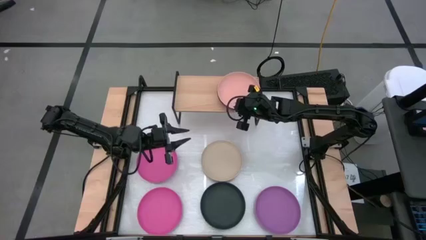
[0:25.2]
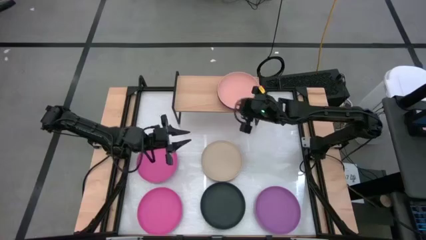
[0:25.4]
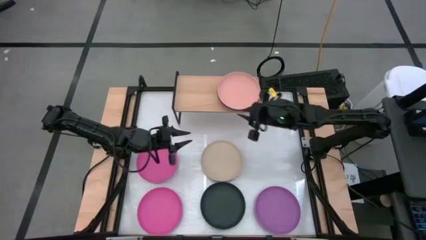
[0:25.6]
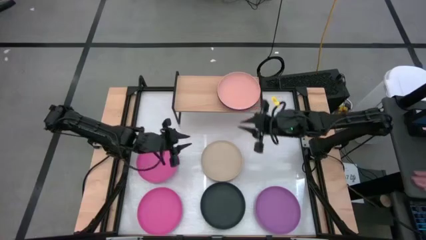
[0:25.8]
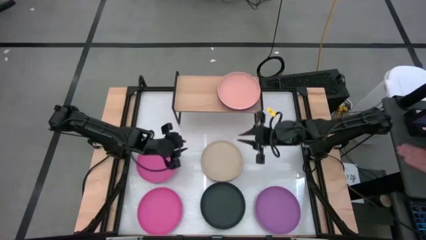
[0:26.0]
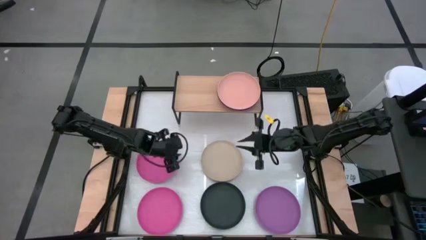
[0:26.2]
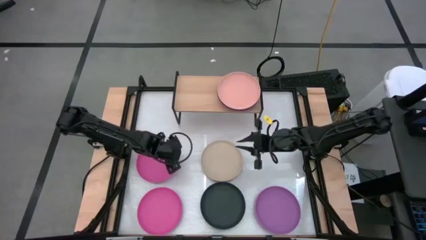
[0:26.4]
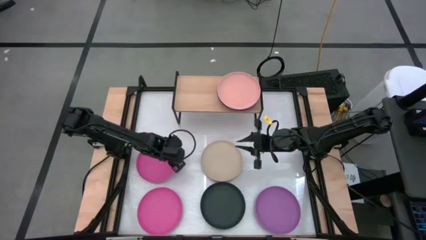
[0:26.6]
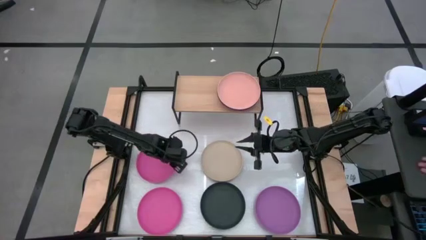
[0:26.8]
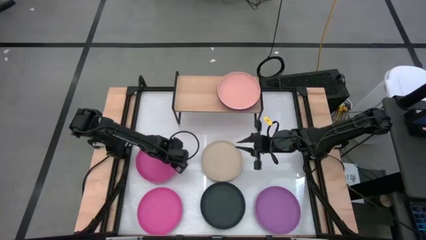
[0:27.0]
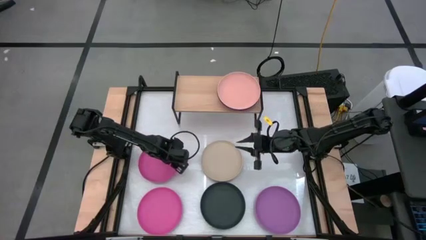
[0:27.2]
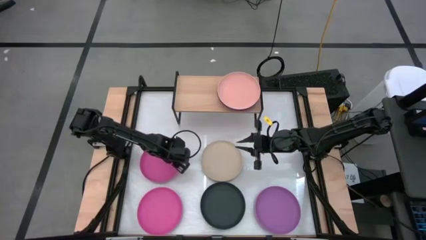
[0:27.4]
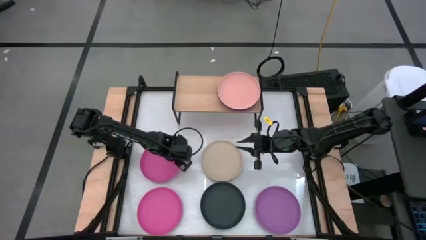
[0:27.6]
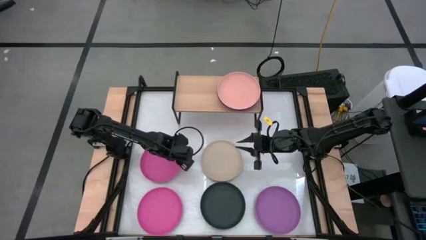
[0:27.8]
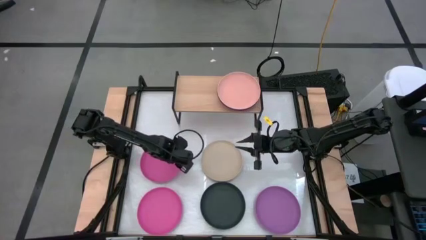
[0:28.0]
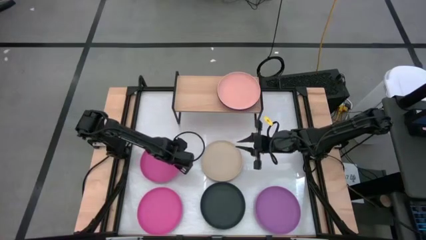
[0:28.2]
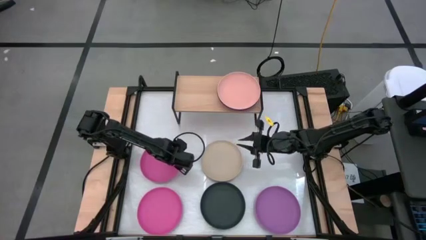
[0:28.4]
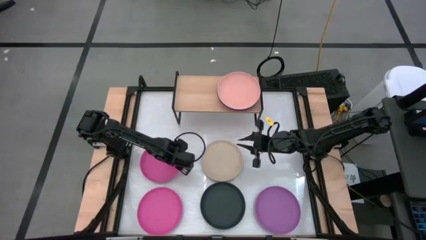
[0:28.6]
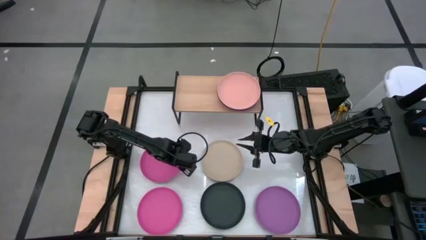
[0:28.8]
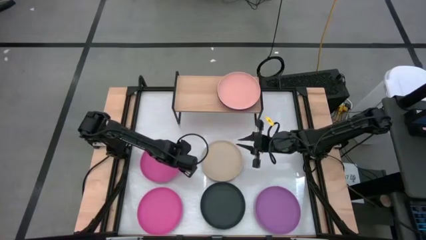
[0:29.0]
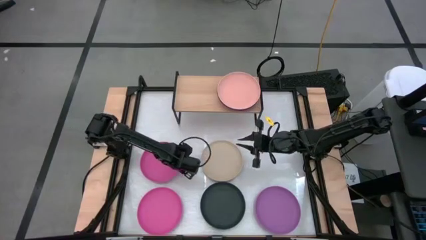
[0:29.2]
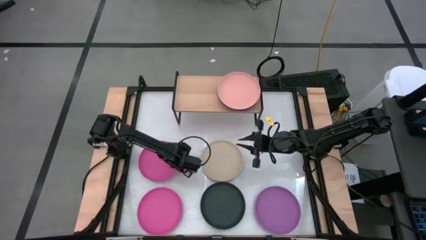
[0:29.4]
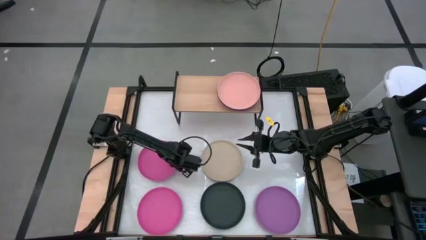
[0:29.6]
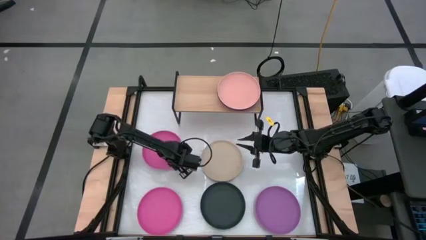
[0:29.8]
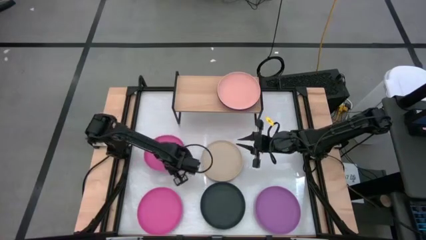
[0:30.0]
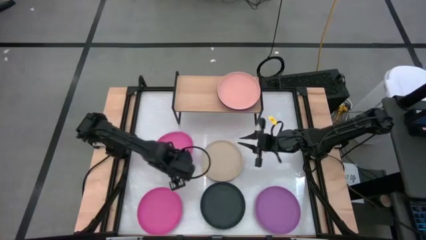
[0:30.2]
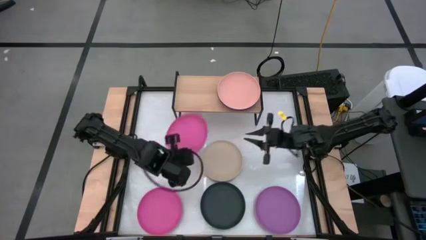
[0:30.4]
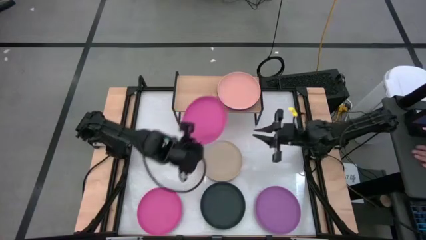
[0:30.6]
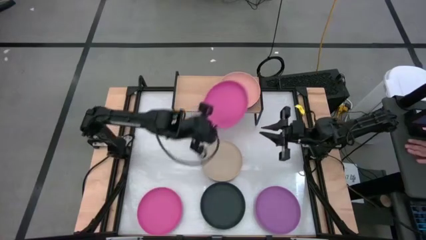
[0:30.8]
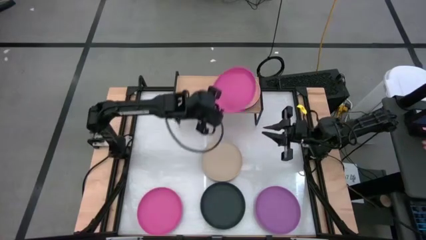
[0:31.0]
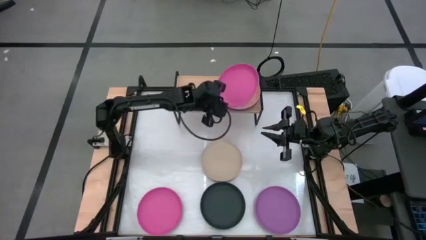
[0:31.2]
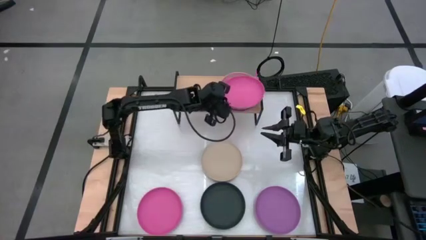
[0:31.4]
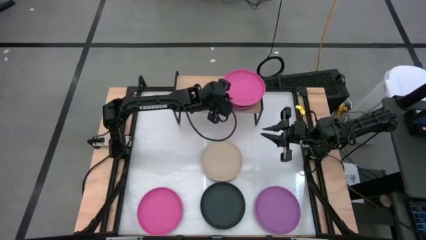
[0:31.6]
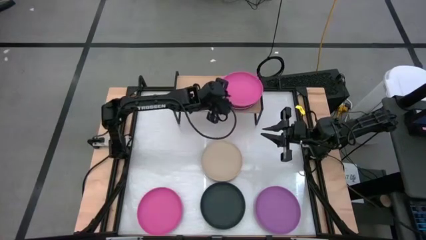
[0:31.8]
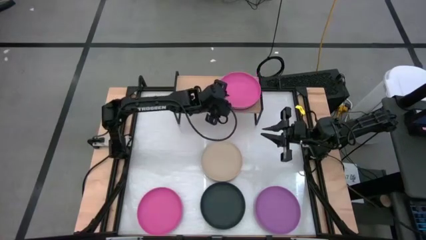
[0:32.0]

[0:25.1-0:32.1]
Task: Place and stack plates onto a shelf
Stack the top pink plate on top of the light pink plate on the shelf

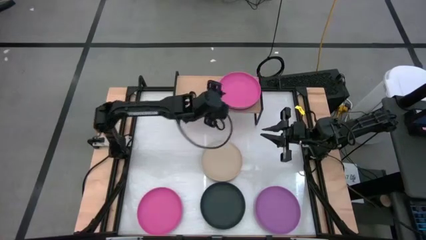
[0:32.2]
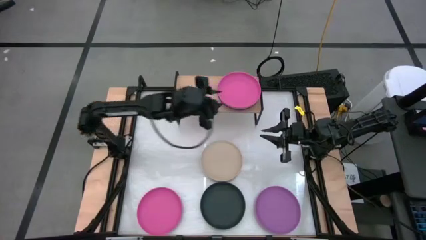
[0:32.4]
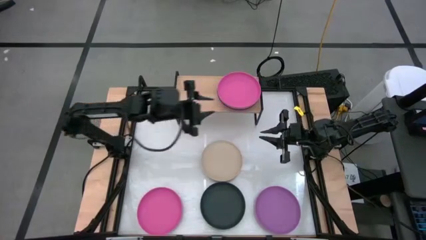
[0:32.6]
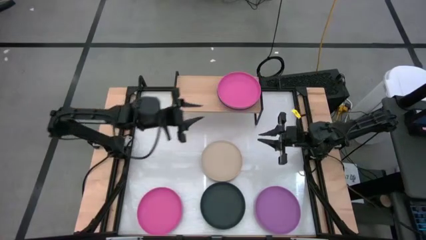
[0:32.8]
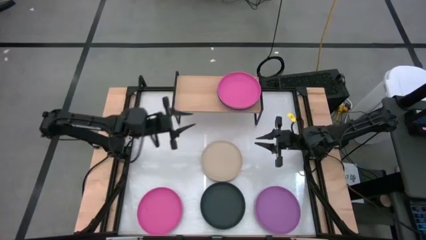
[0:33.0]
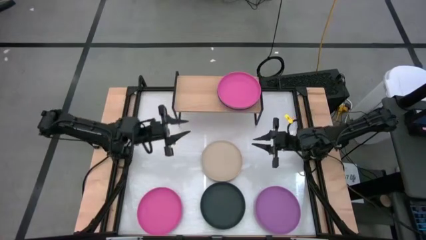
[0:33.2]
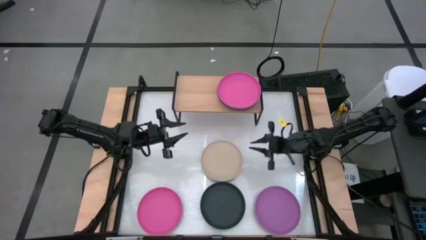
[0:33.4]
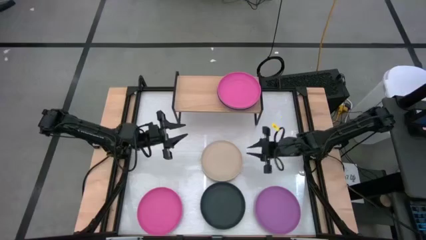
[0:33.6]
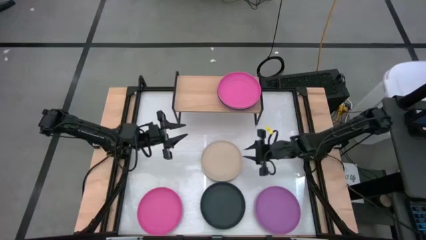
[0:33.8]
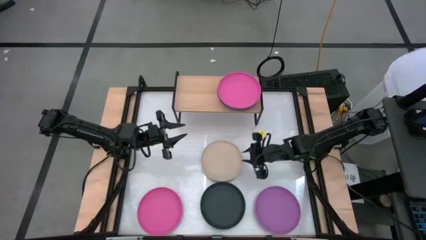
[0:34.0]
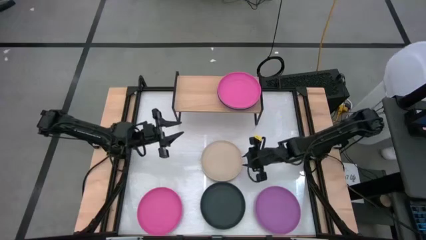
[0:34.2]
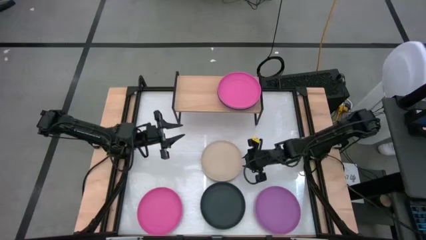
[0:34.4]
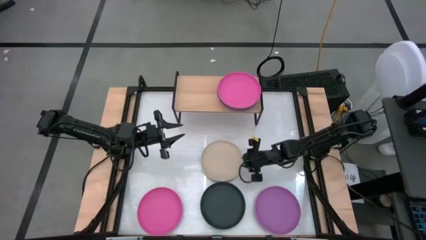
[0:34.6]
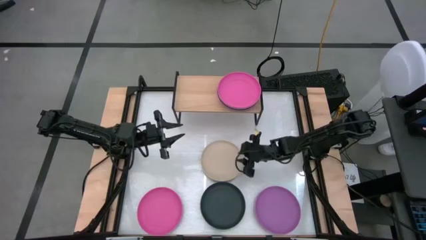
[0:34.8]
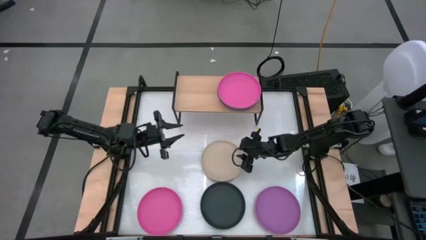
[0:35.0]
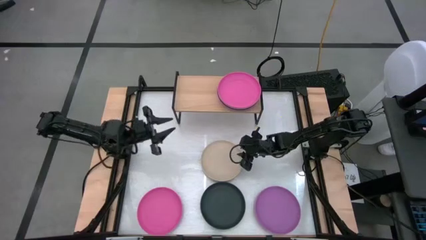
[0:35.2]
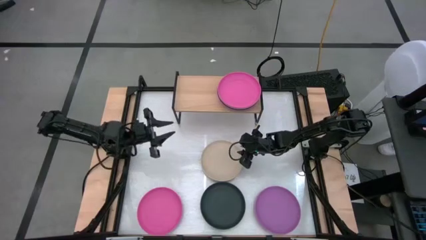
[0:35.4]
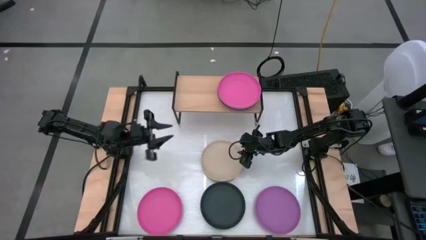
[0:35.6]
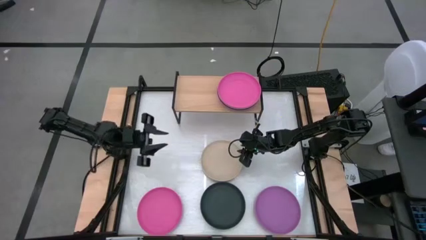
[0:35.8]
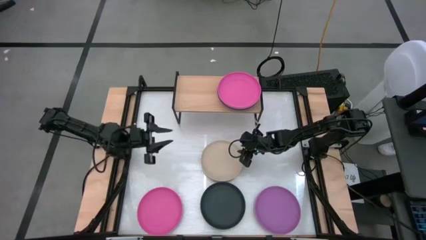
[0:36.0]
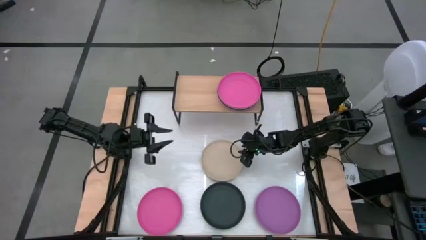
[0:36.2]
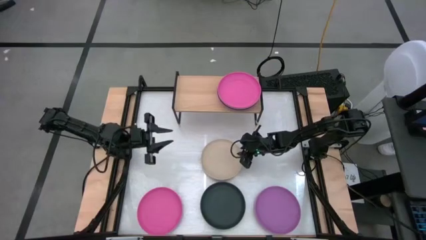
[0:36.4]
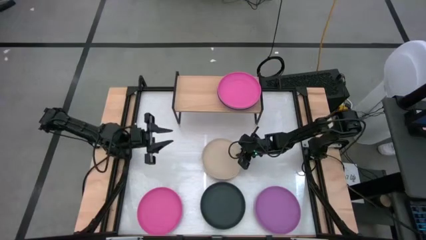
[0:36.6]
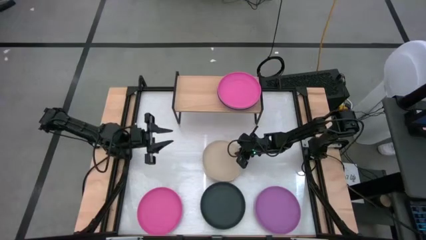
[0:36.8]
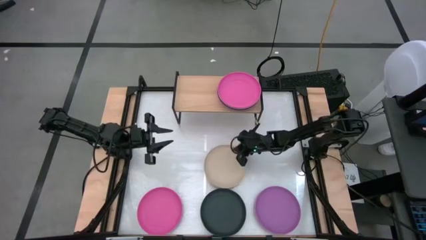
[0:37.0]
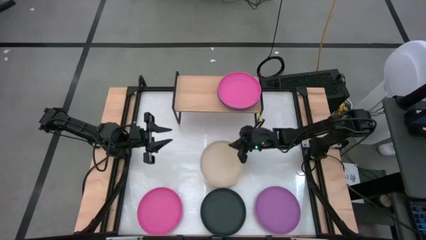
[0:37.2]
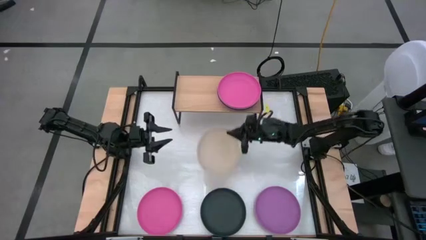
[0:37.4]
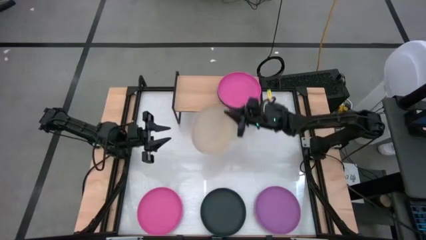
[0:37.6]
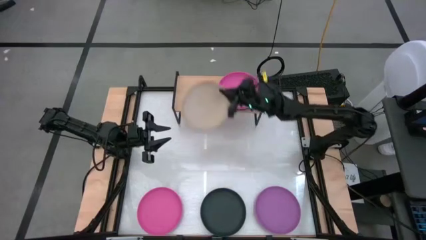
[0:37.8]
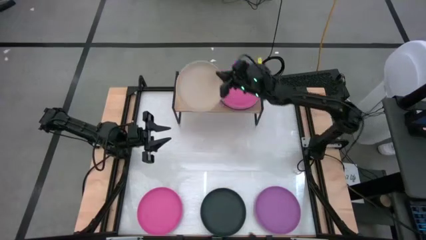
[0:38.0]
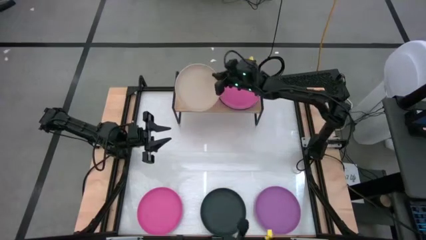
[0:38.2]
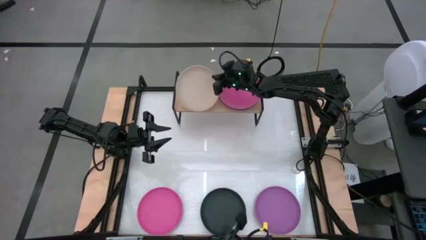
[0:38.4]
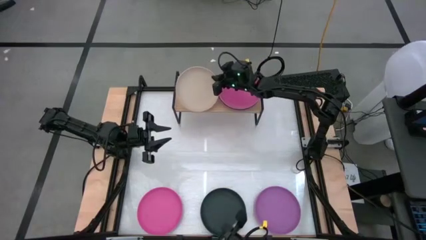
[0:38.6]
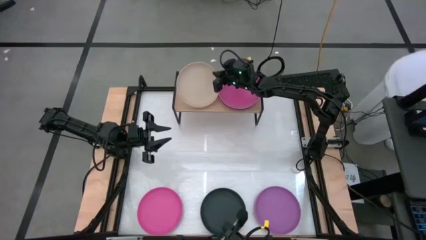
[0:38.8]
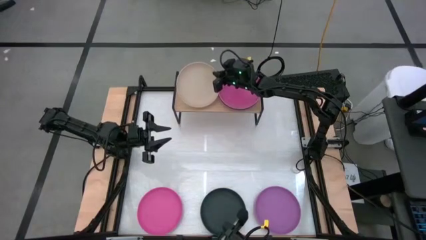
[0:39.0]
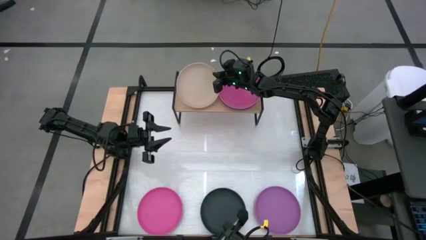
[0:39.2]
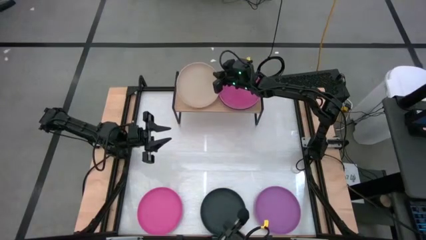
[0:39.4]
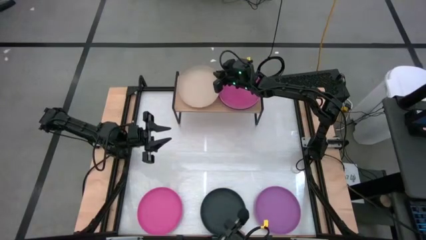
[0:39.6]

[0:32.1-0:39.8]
Put the gray plate on the shelf

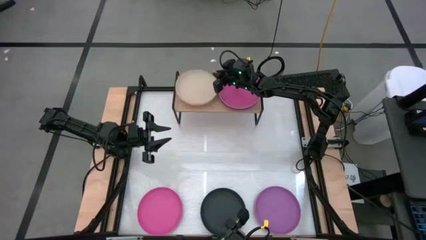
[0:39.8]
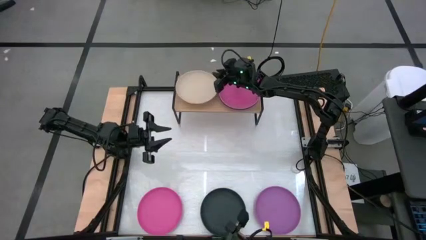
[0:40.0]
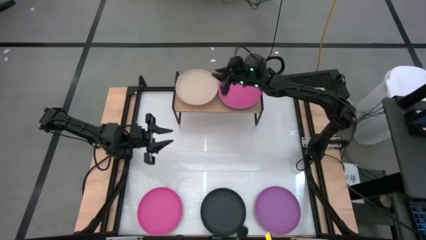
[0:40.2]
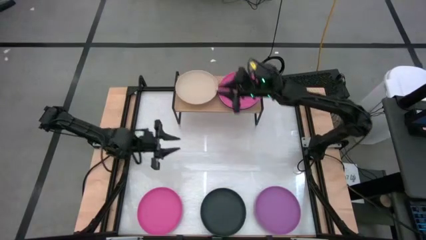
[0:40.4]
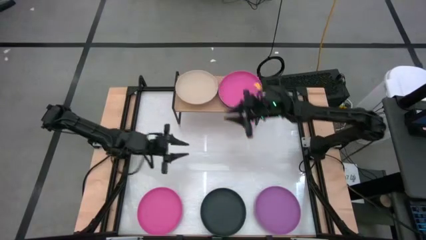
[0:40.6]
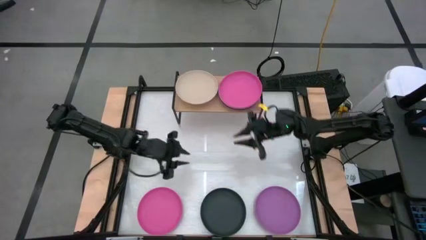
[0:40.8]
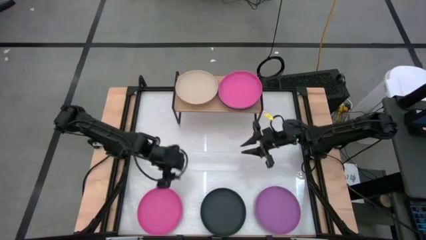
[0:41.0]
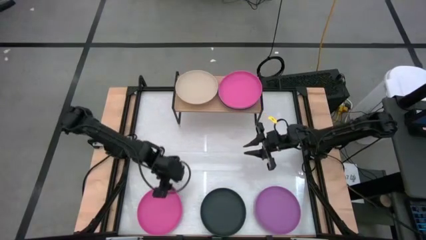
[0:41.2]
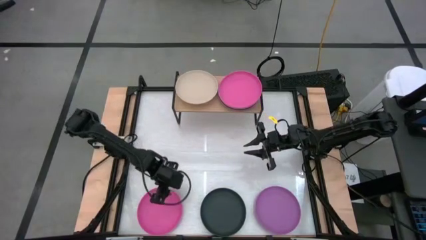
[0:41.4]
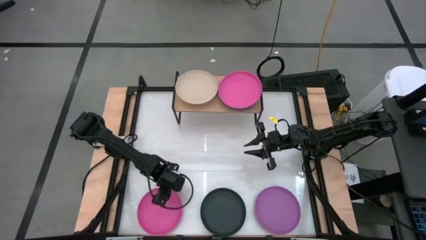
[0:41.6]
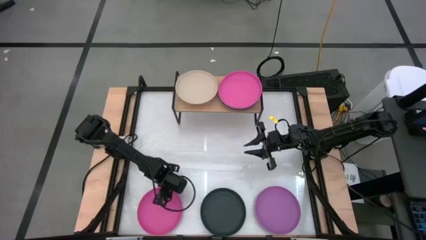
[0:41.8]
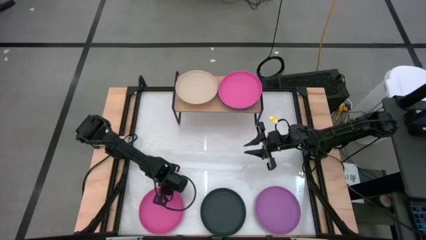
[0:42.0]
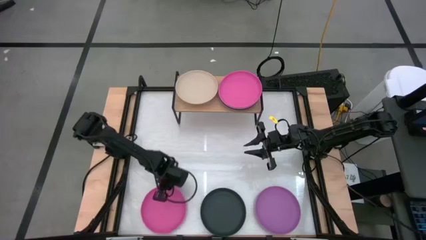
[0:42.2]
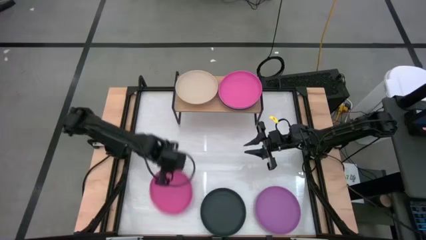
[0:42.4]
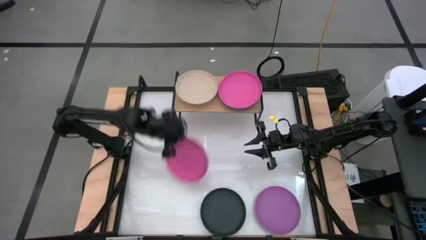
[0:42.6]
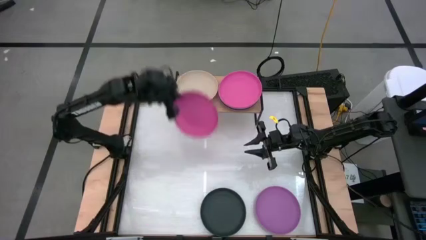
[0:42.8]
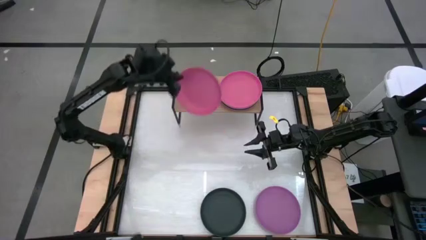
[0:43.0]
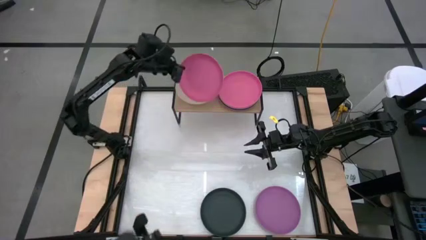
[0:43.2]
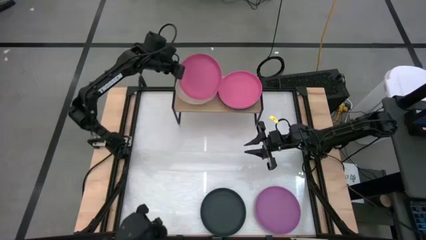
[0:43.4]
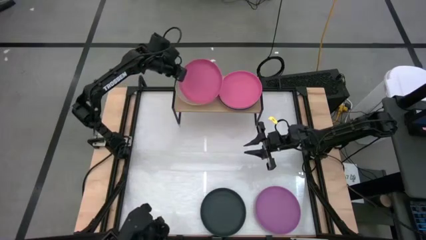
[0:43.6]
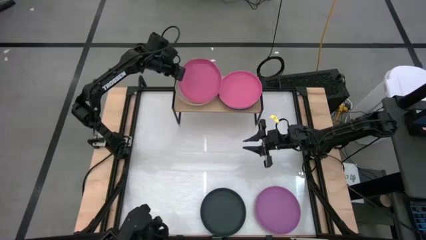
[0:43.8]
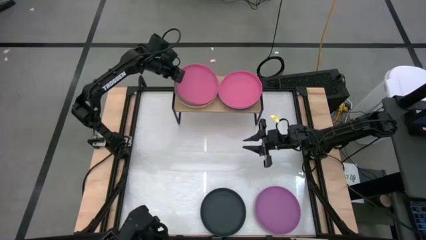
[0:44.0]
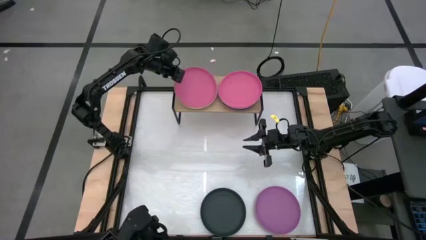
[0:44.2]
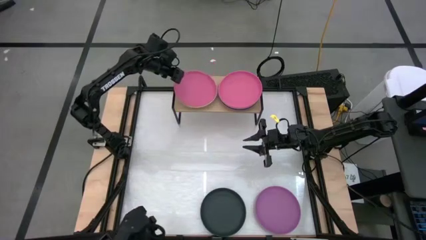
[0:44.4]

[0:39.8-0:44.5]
Stack the pink plate on top of the gray plate on the shelf
